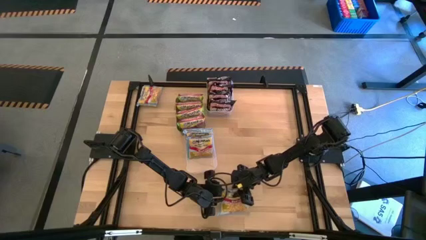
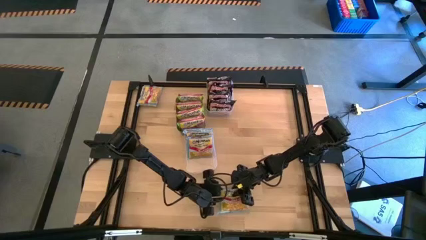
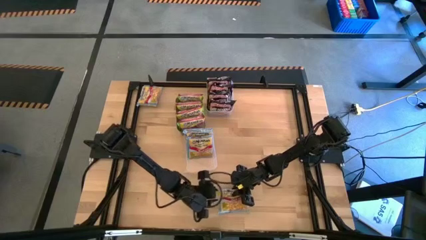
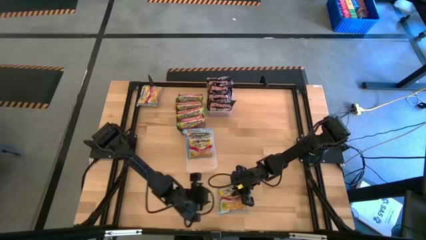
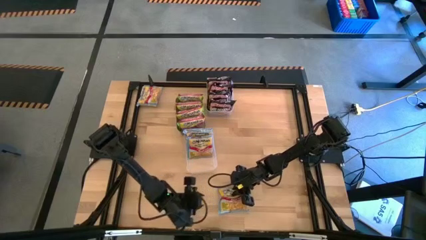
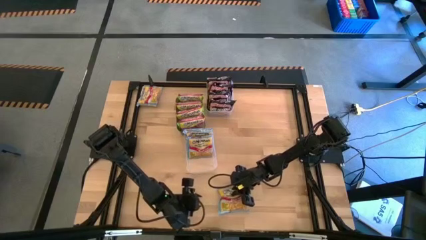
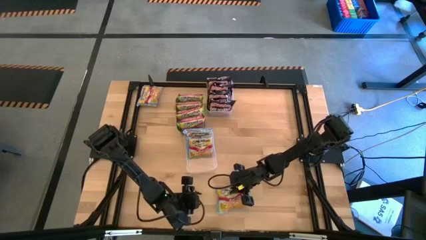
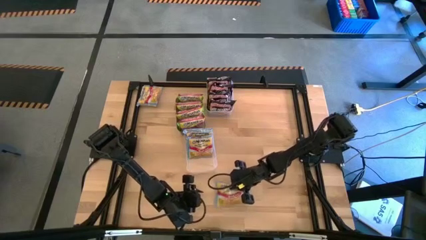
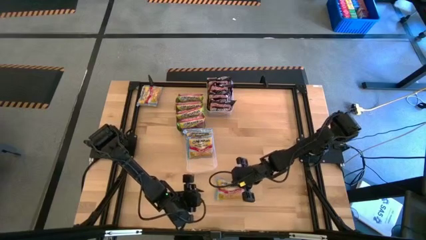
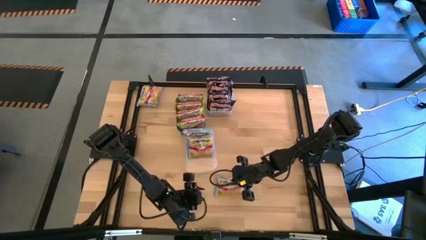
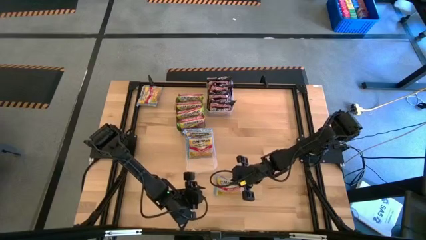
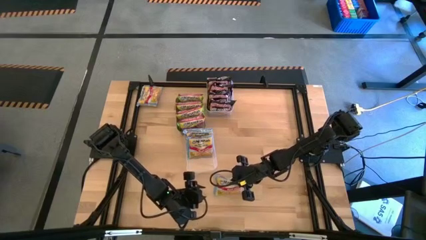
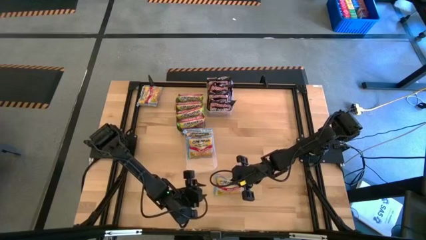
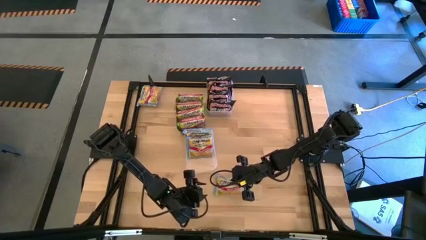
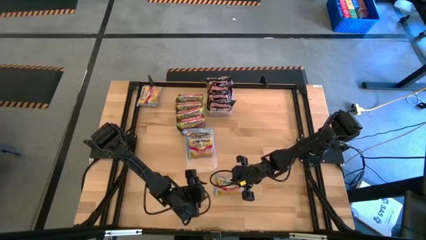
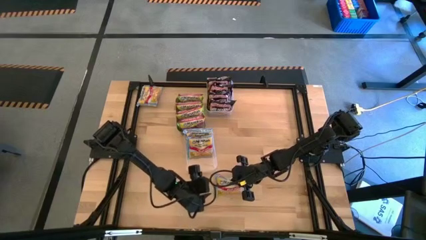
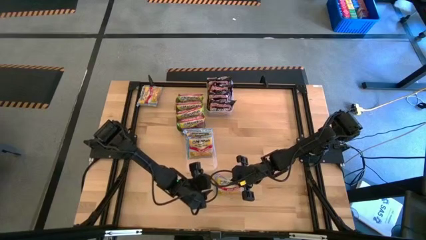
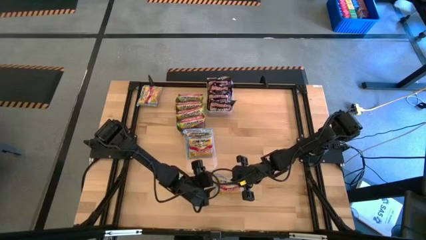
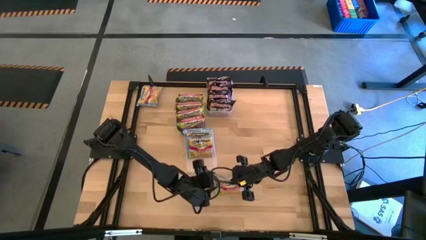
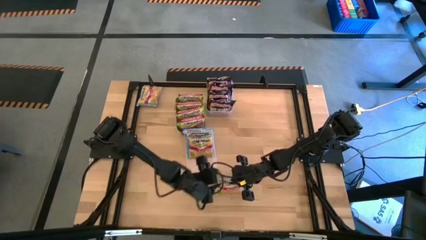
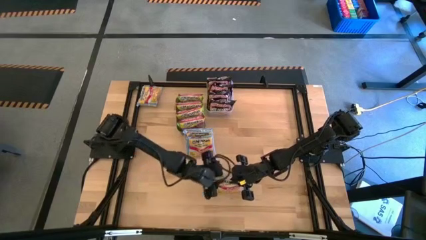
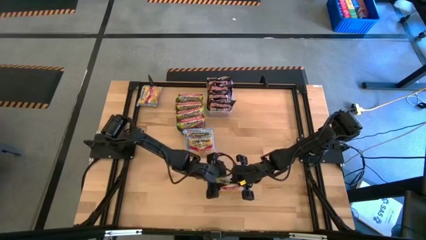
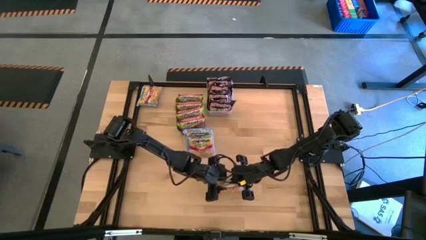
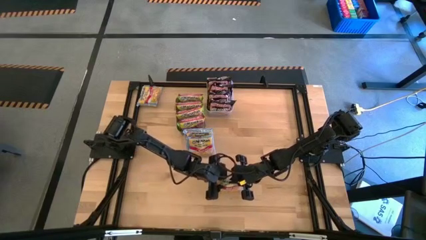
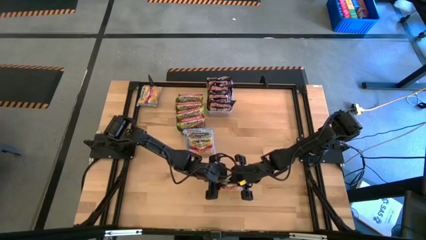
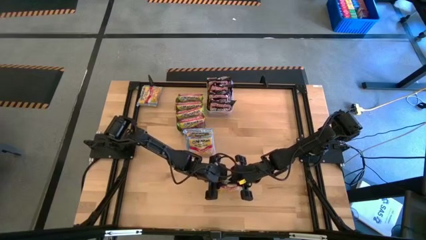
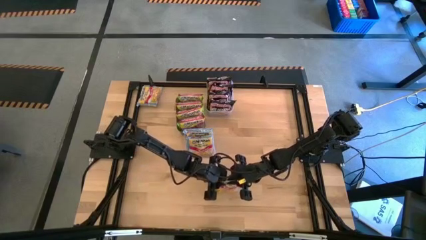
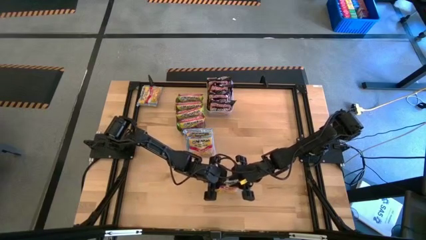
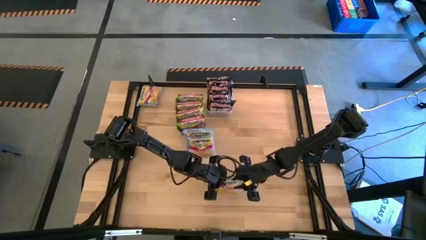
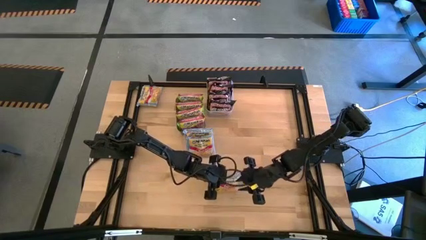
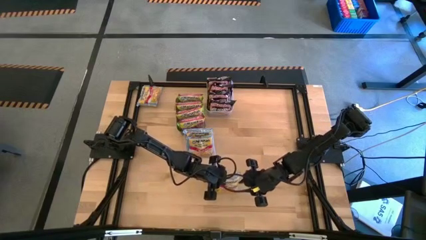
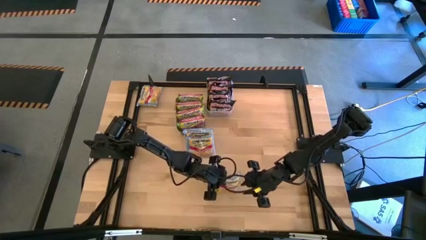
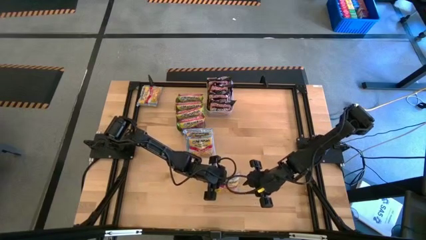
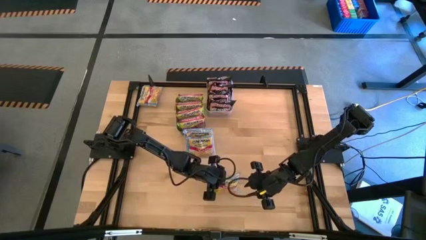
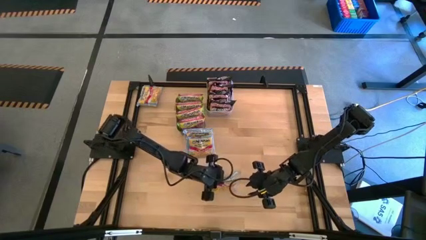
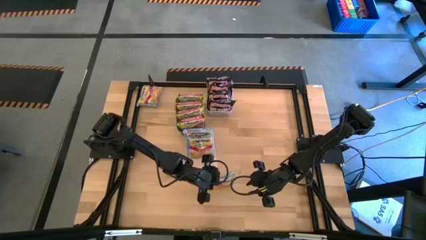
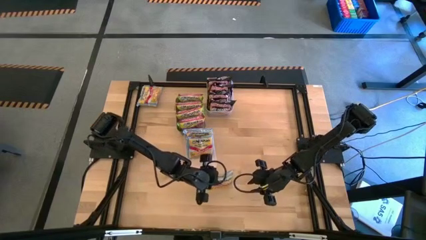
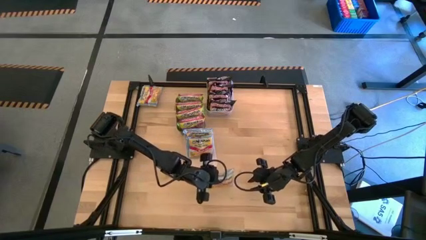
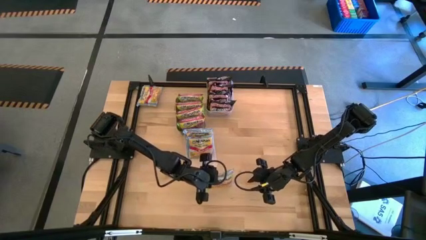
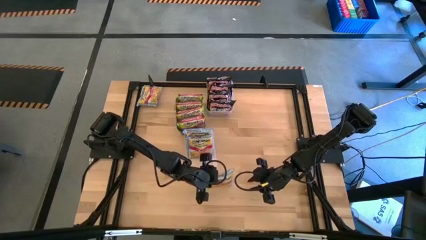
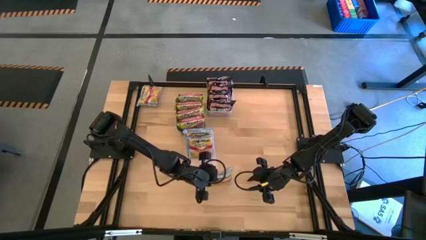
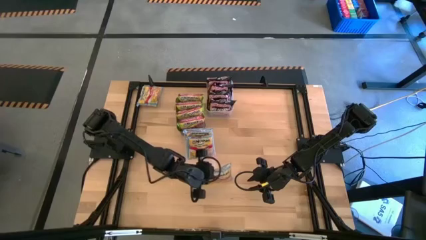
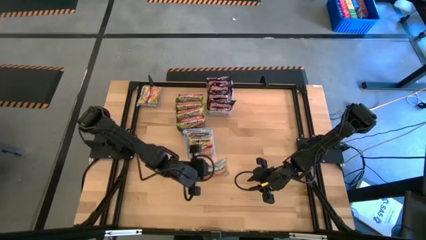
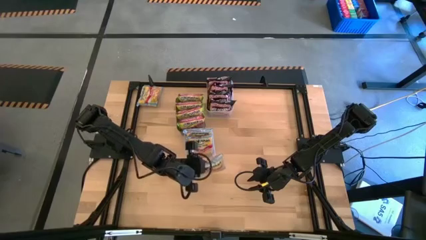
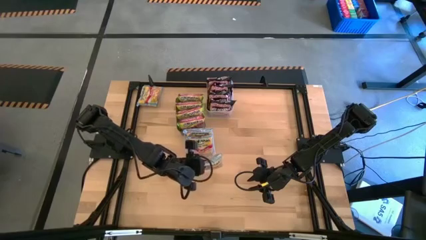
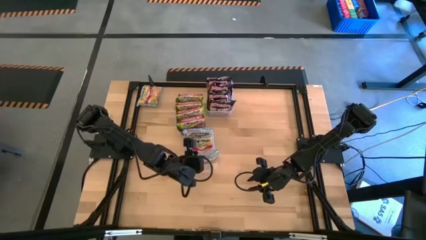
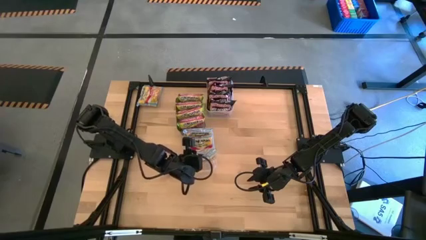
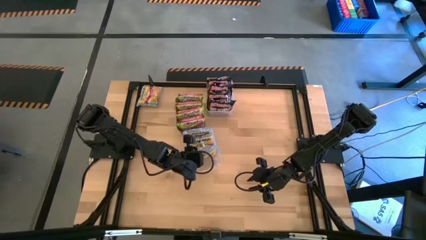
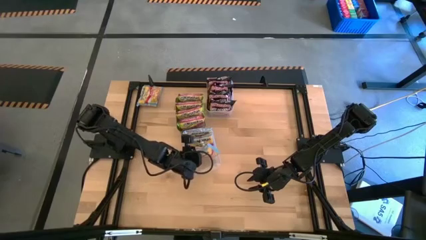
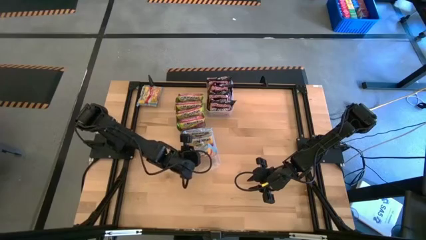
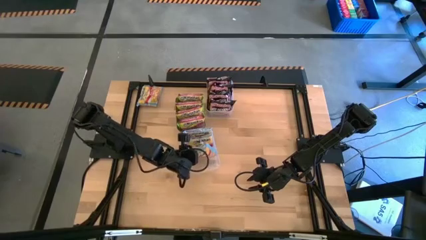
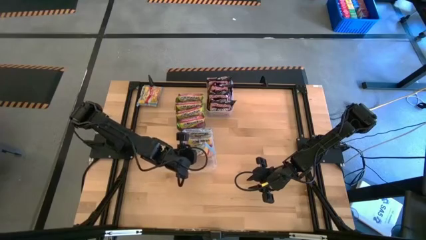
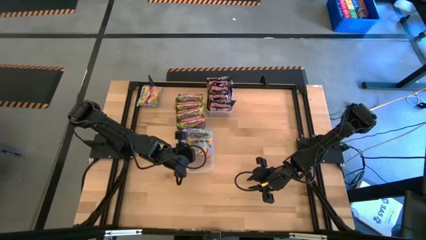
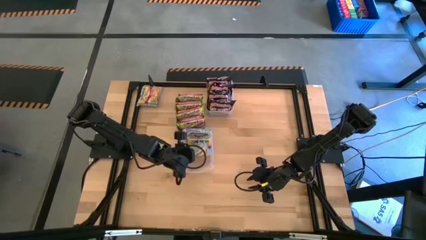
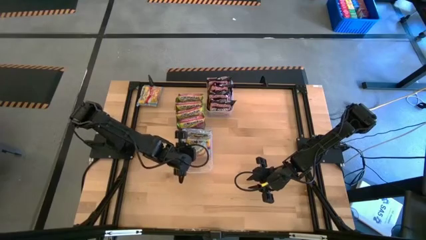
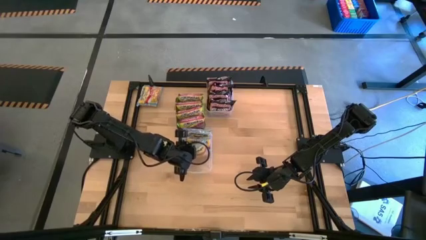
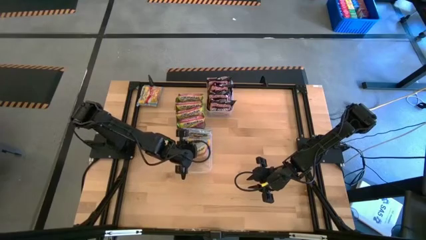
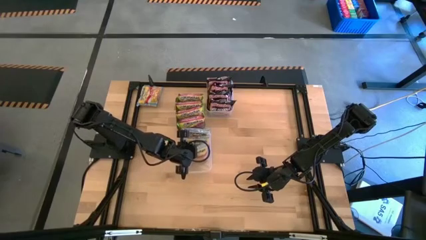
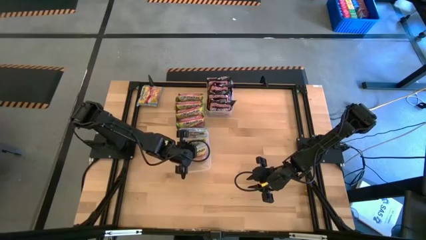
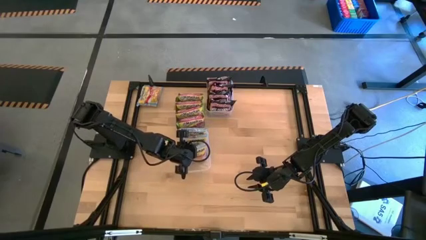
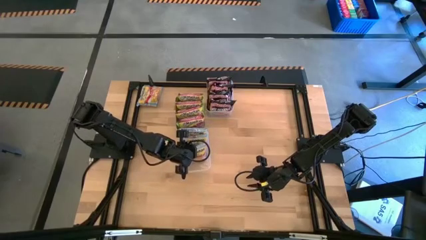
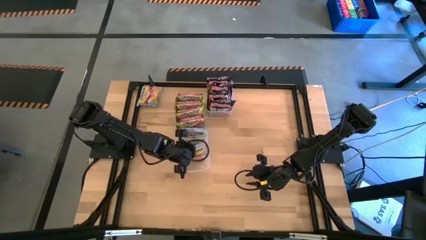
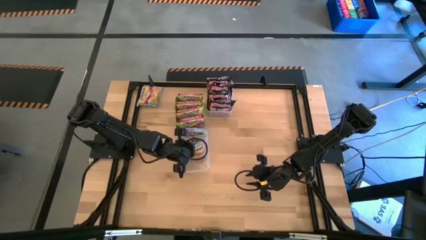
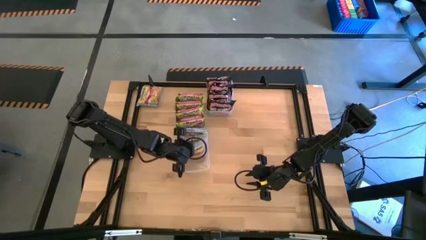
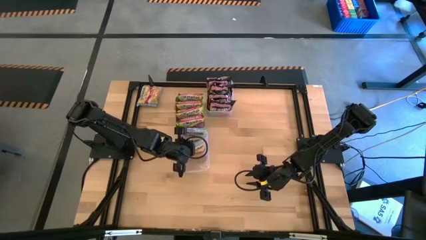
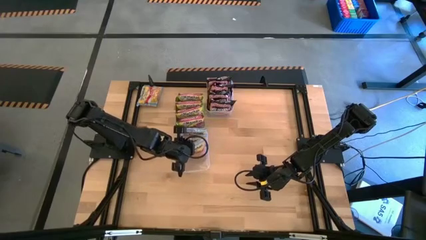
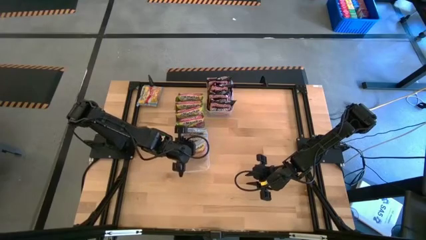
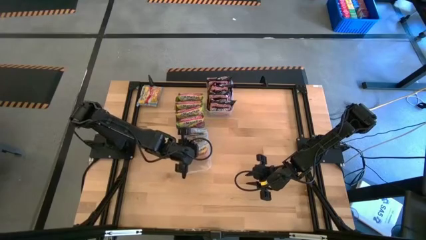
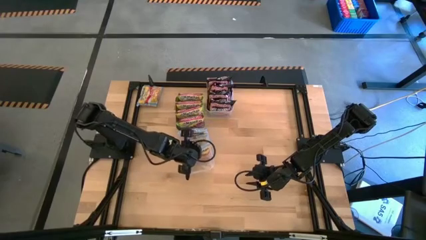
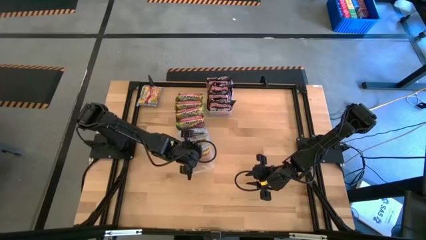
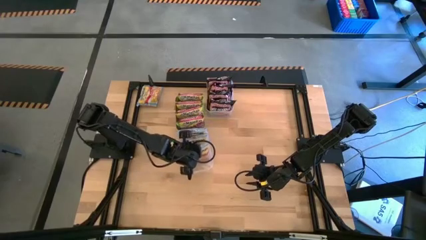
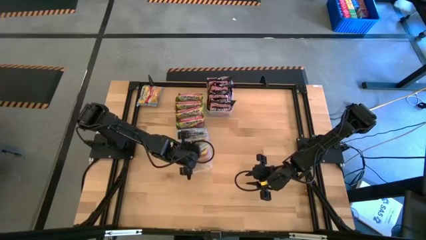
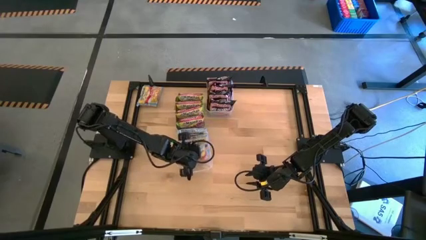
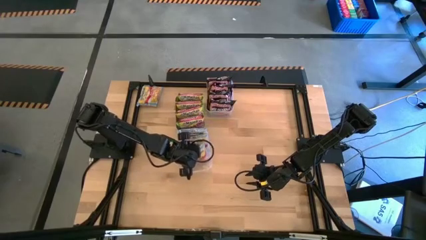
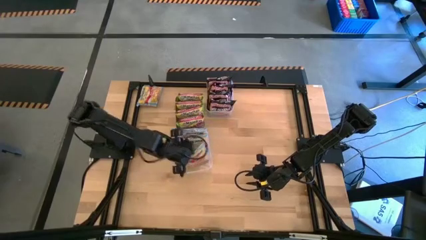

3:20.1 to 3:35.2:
Task: Sort Maruchan noodles
Put the bottom blue noodle pack into the bottom transparent bin

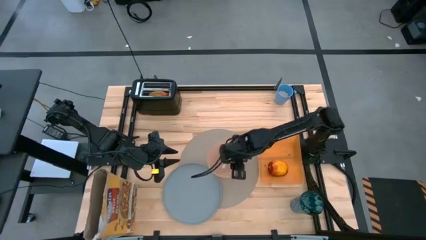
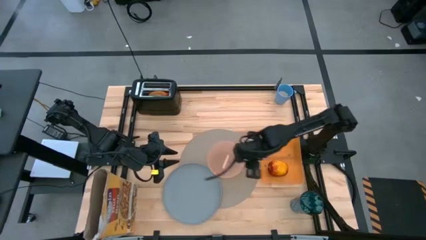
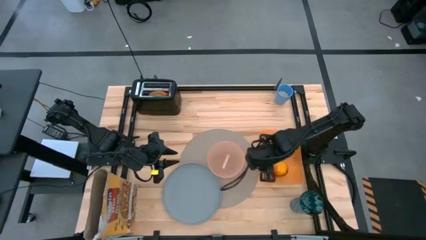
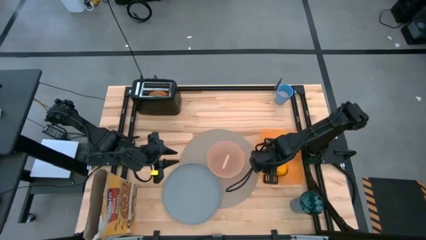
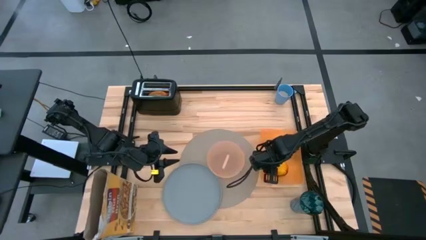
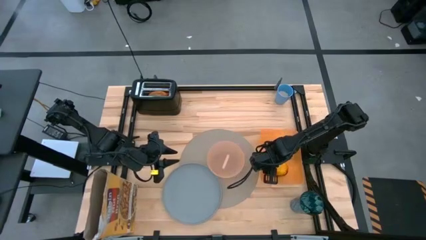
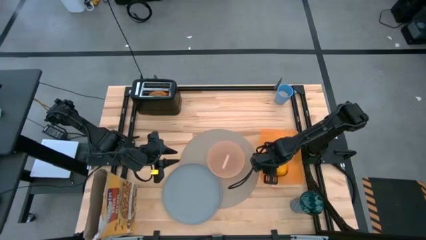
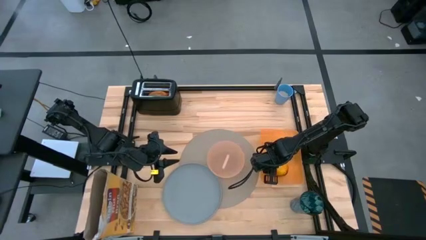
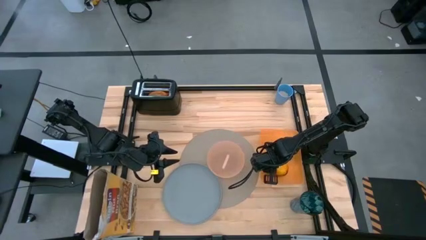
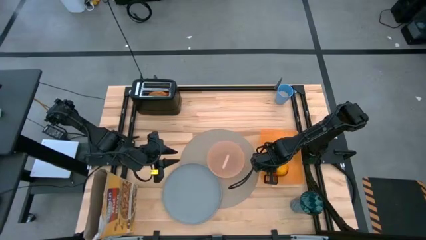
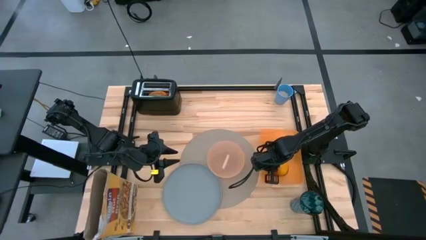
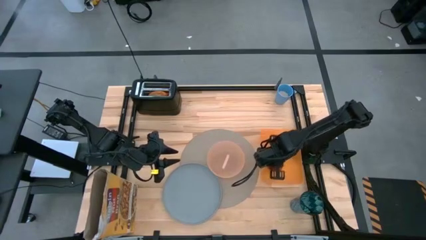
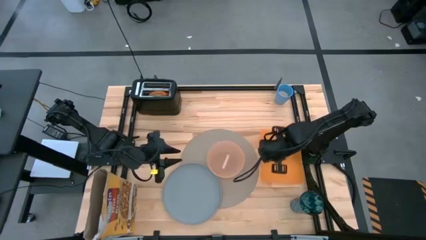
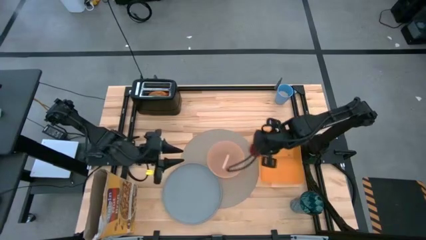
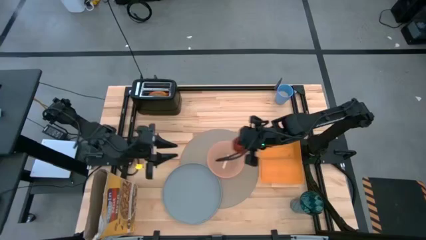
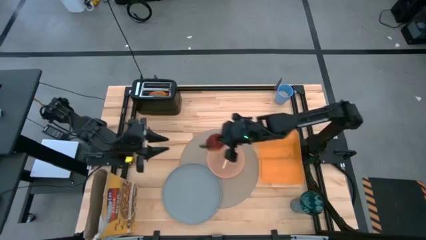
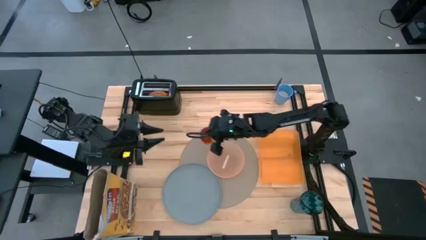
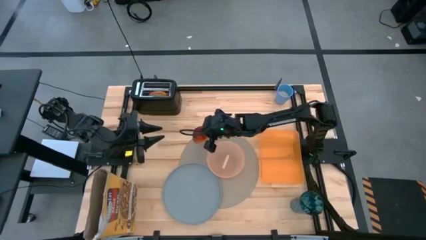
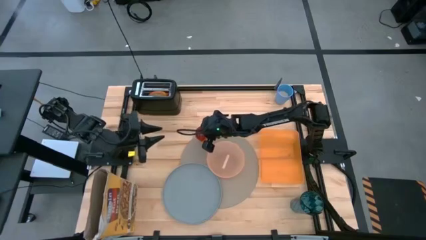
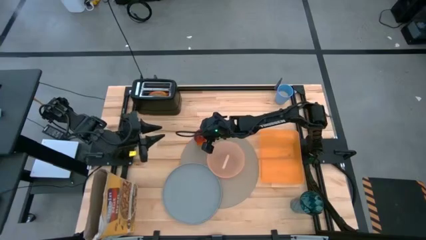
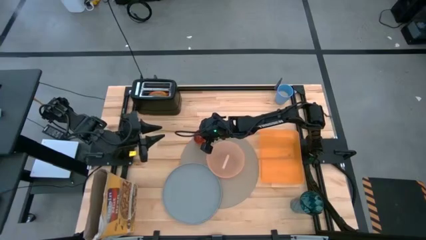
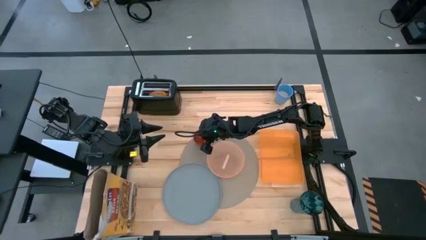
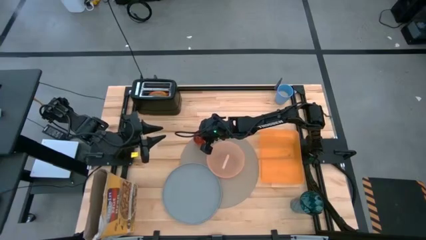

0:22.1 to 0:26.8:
Task: Arrange a breakfast setting
Put the red apple to the top left of the light orange bowl on the gray mat
